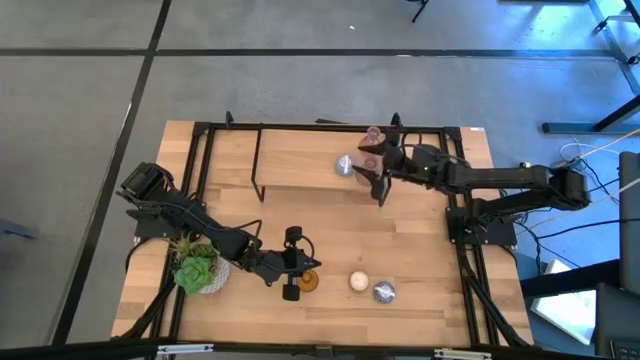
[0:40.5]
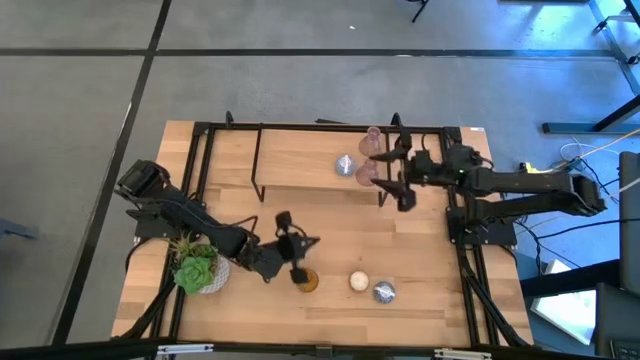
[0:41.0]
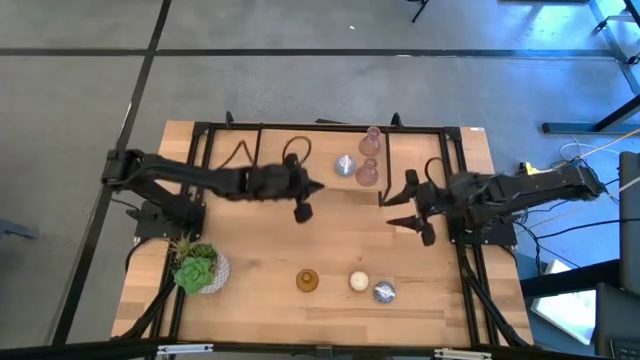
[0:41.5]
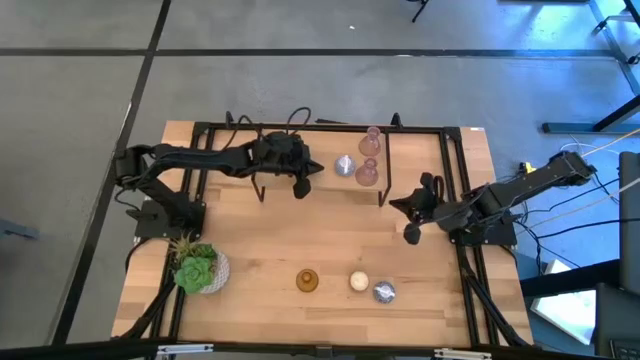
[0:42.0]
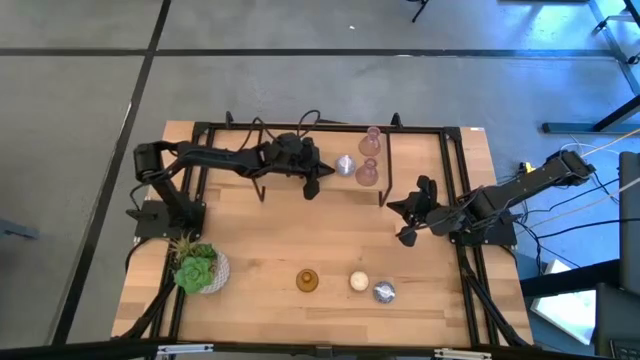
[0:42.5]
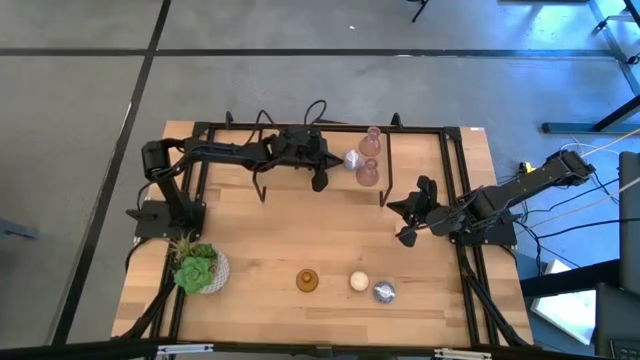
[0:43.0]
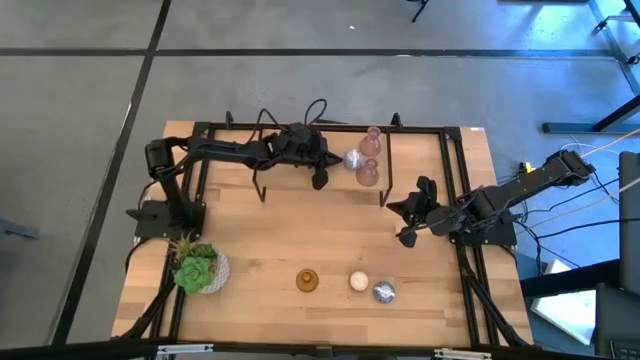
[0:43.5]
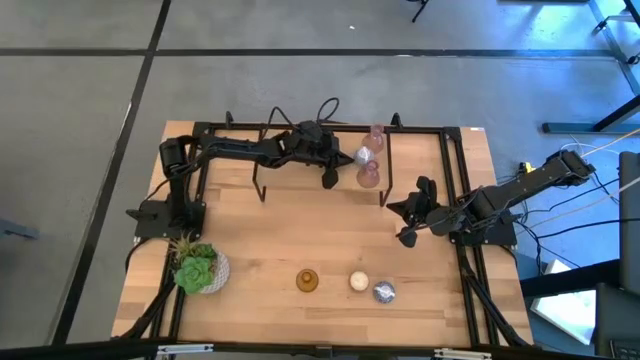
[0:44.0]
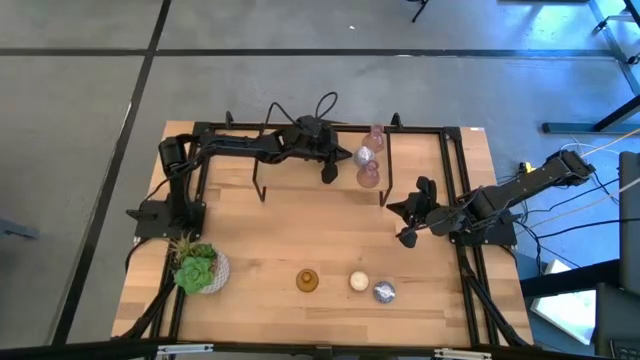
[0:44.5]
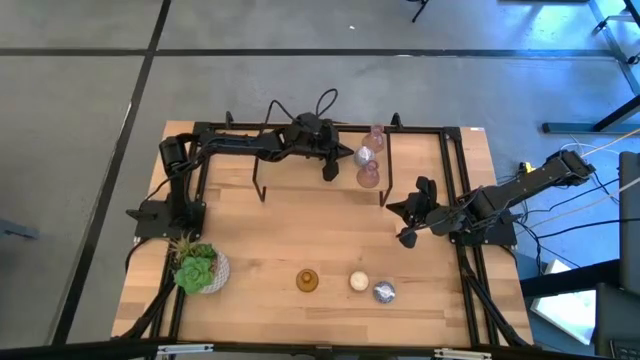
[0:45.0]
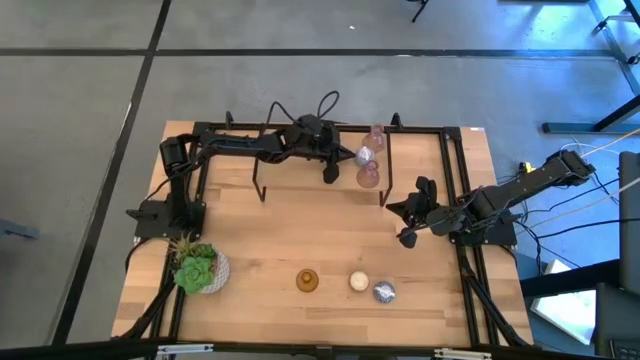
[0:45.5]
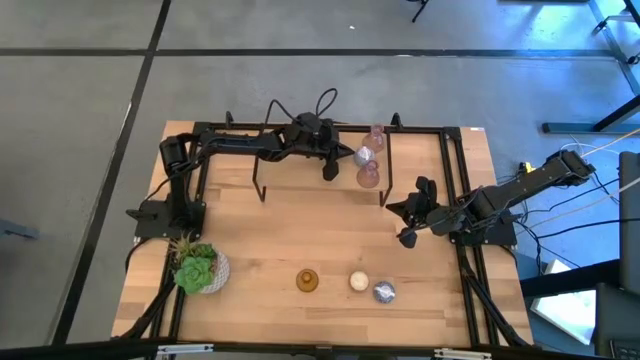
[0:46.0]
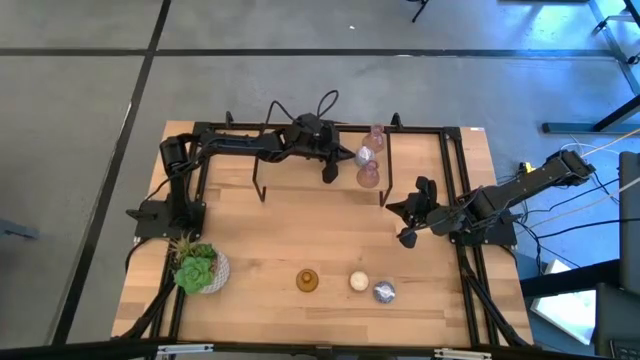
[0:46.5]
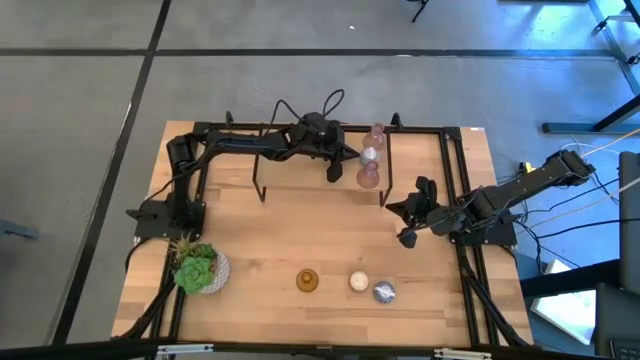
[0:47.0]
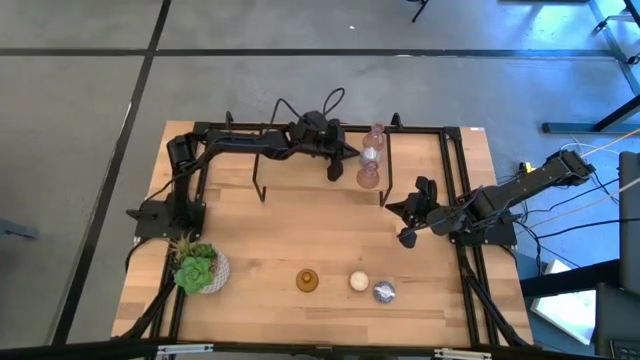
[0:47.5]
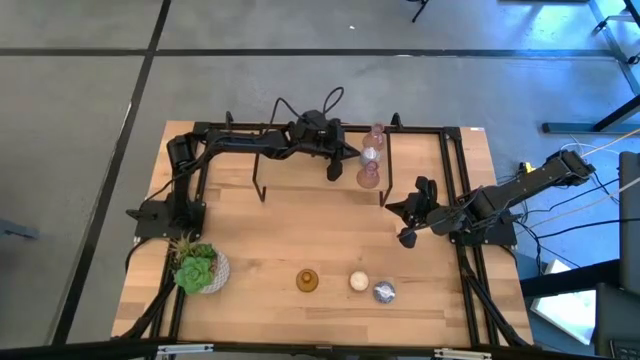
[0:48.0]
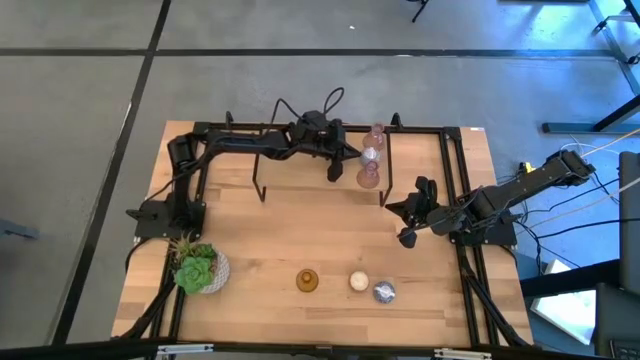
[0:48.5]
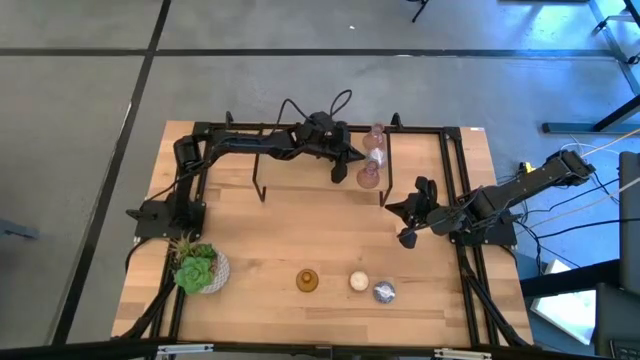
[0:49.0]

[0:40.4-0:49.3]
Task: Pick & Place candle stick holders
Adjust the light blue scented candle on the shelf

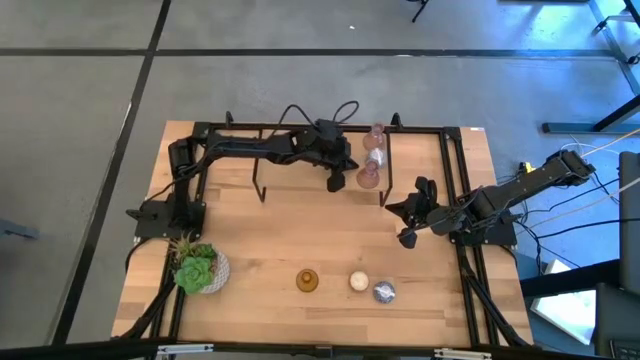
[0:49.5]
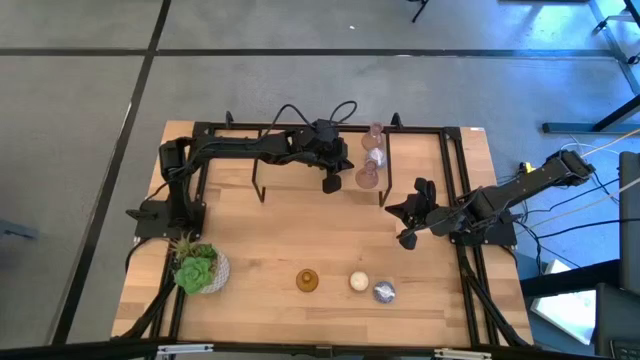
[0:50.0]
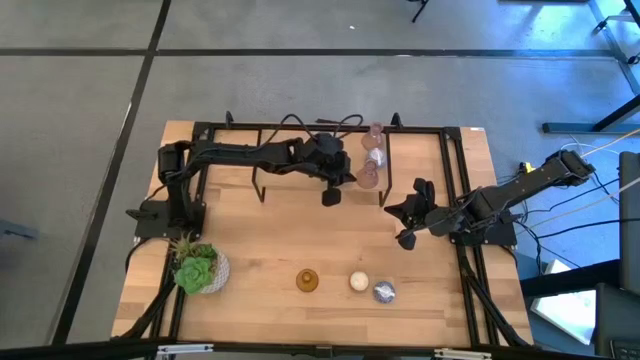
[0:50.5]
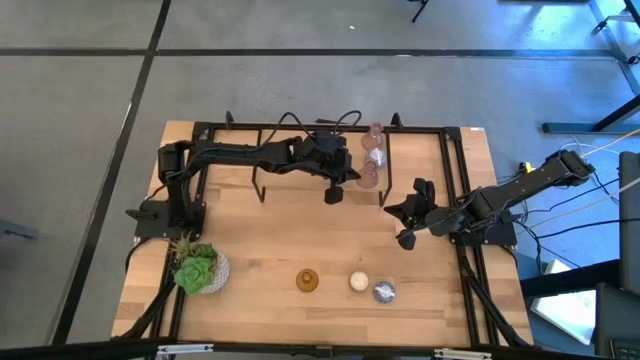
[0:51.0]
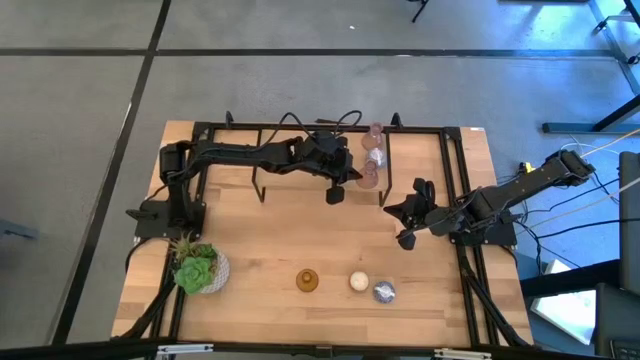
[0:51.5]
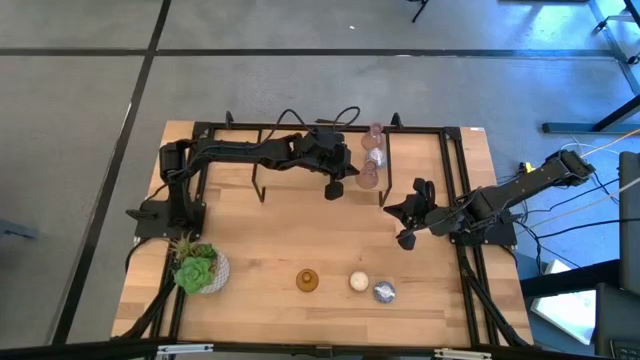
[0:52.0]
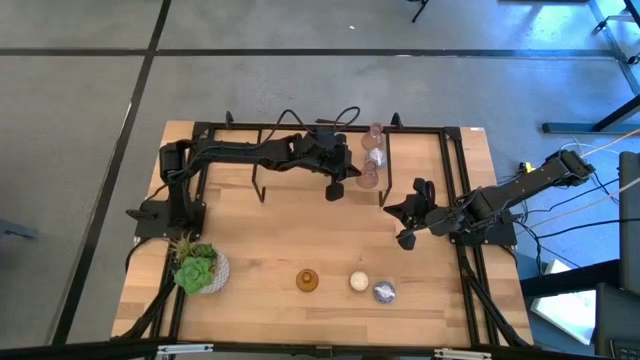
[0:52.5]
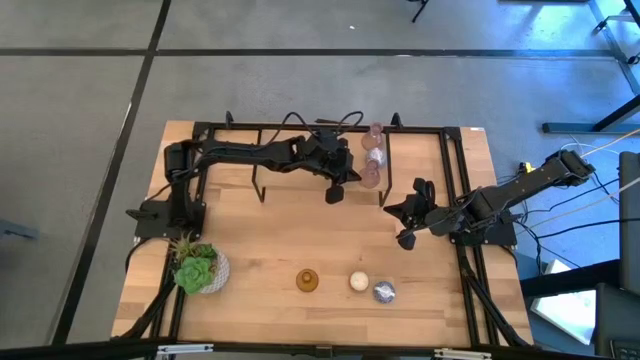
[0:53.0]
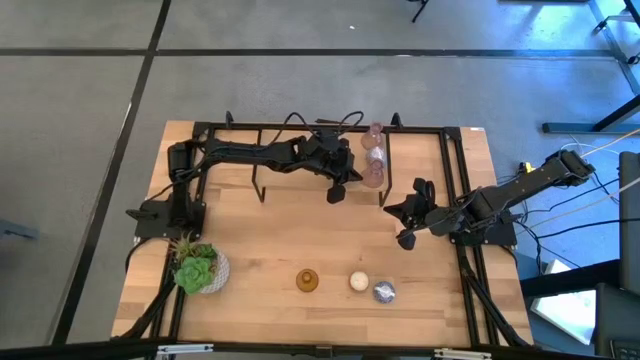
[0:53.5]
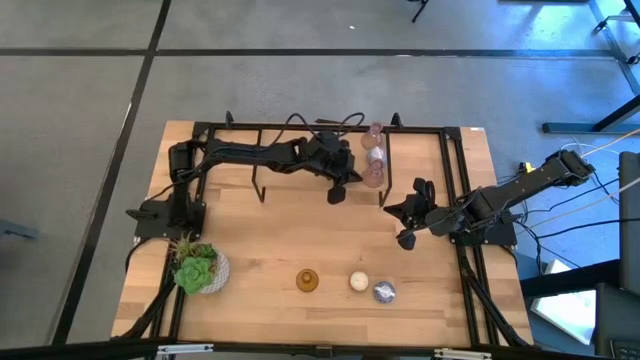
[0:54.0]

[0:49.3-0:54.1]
Adjust the pink glass candle holder on the shelf

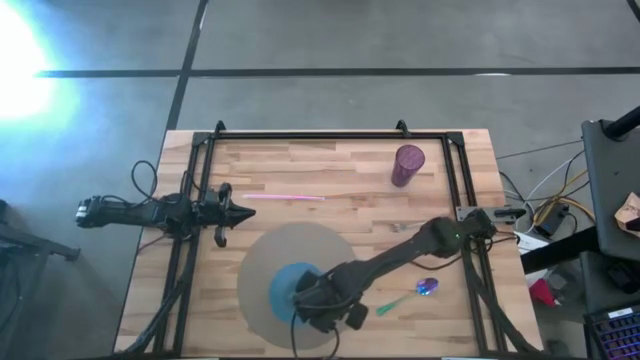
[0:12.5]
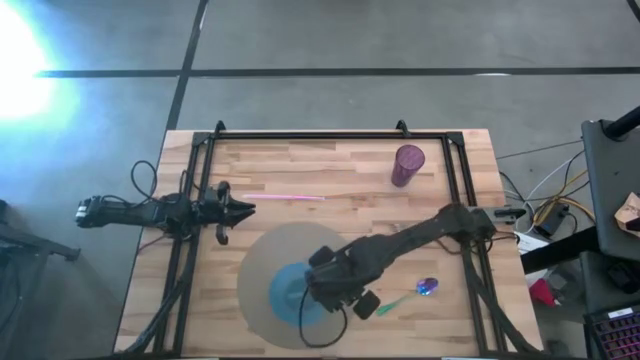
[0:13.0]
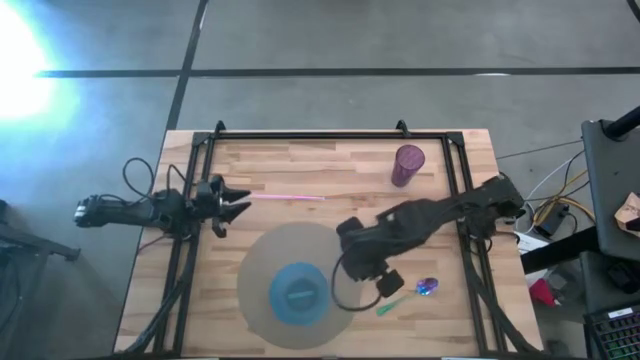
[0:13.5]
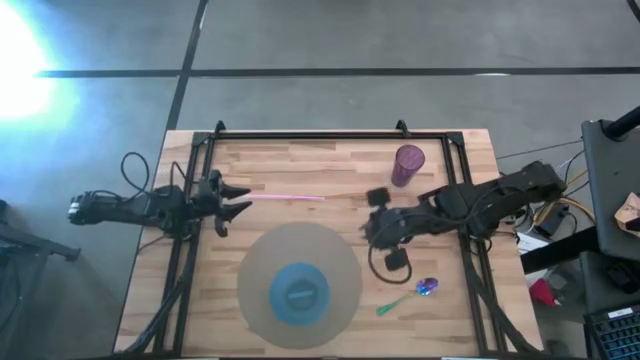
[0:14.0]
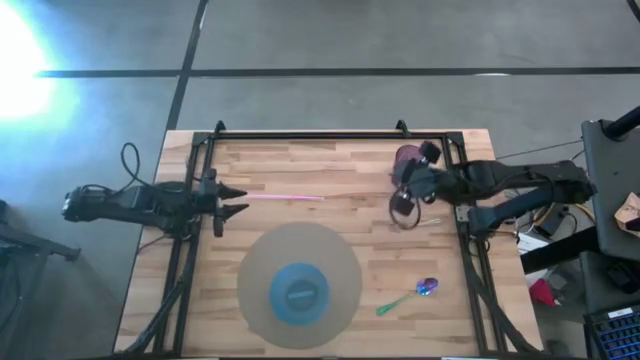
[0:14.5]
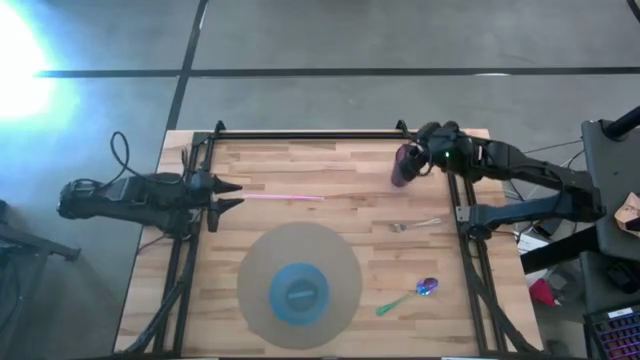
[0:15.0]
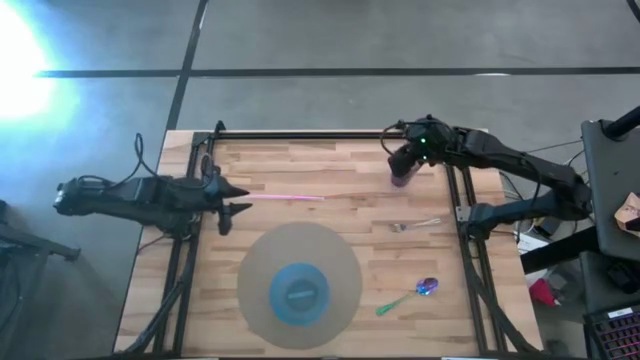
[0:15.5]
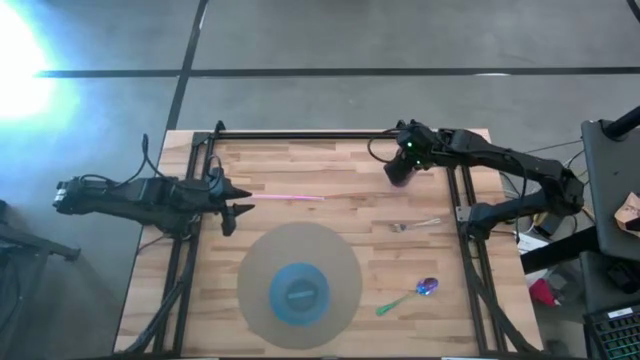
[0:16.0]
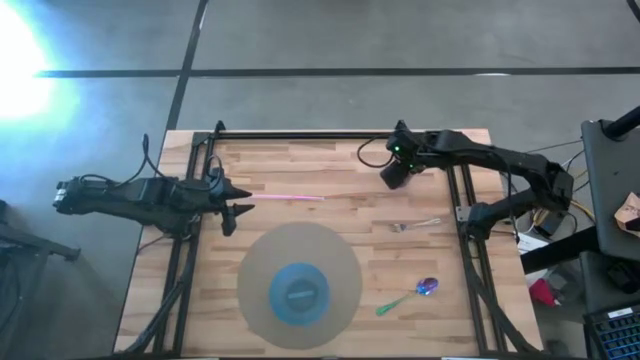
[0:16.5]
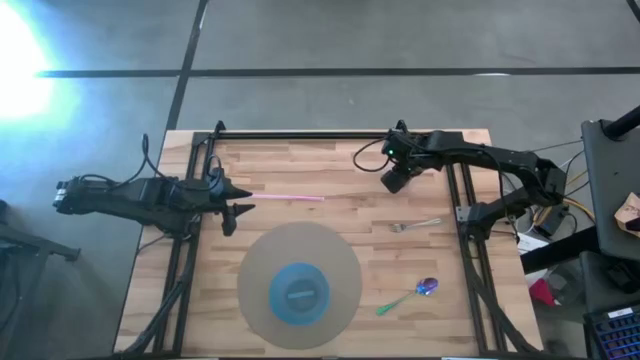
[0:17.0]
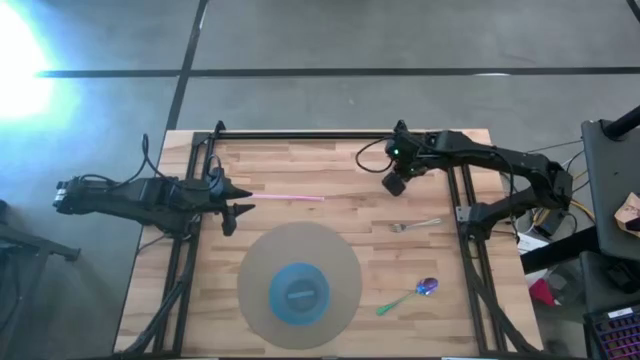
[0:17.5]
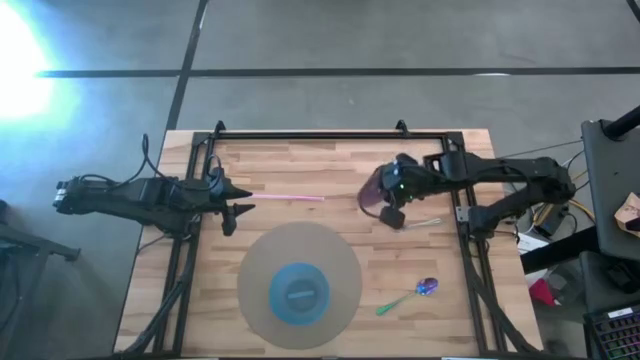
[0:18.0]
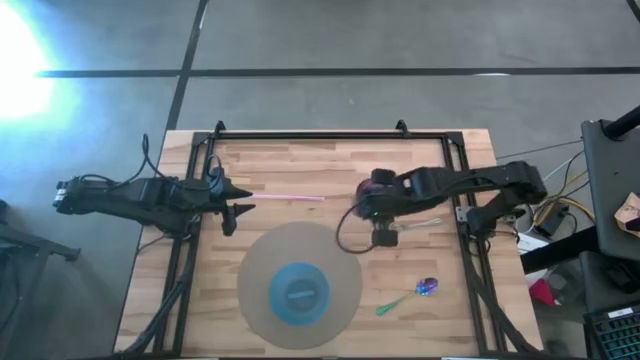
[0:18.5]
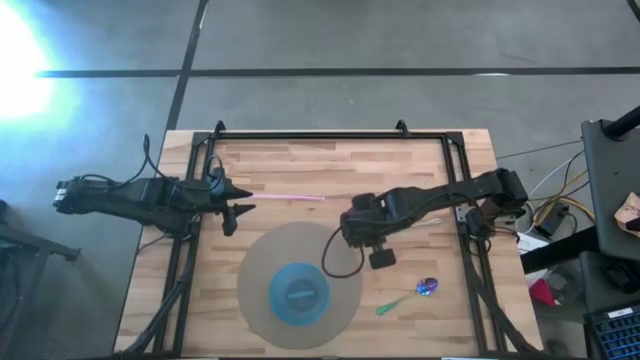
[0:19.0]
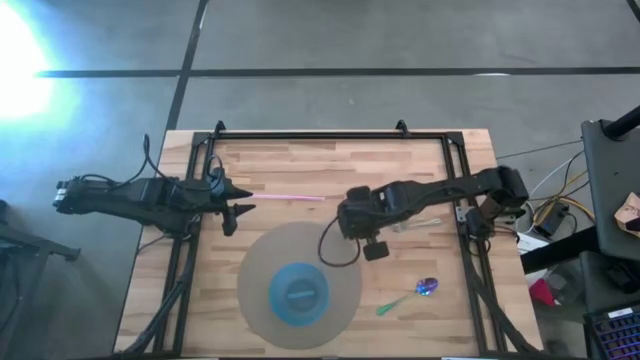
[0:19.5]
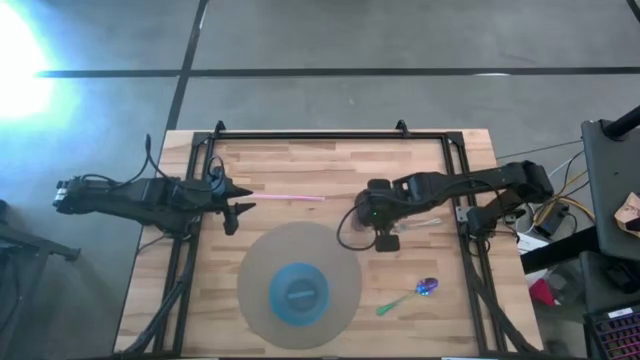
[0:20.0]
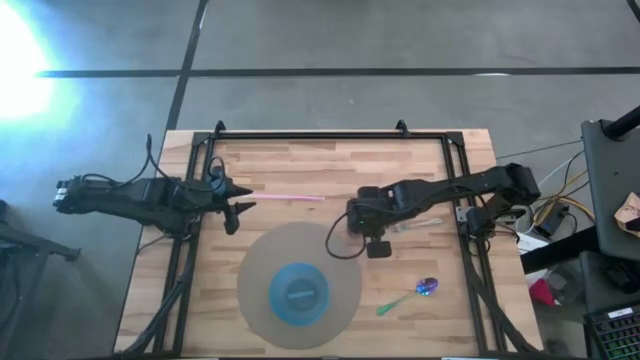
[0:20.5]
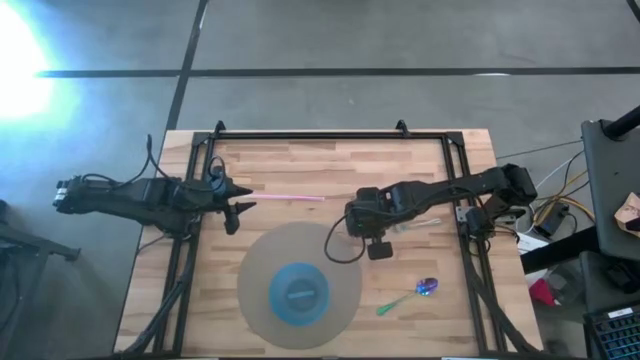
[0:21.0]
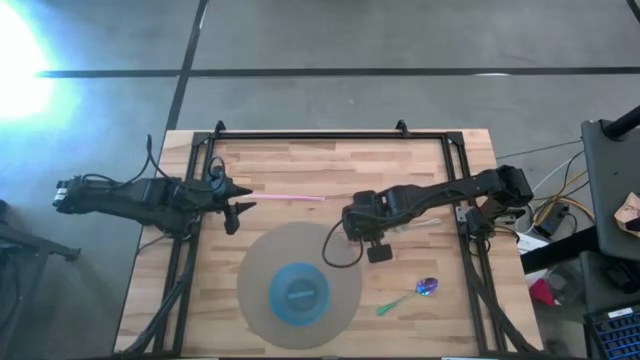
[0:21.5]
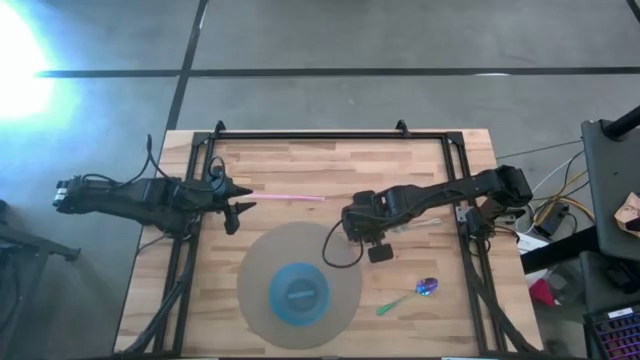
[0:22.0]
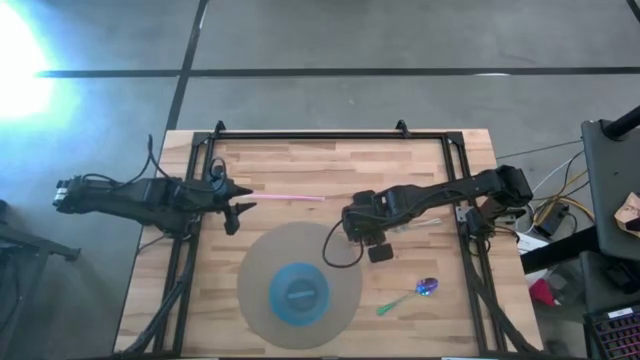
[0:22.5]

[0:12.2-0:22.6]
Task: Pick & Place Utensil
Put the purple cup to the top right of the brown placemat
